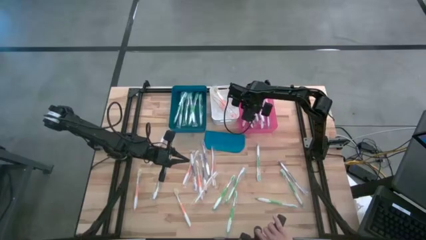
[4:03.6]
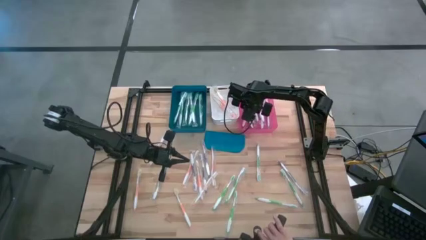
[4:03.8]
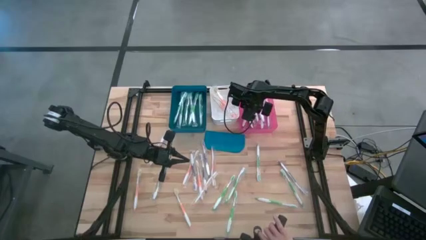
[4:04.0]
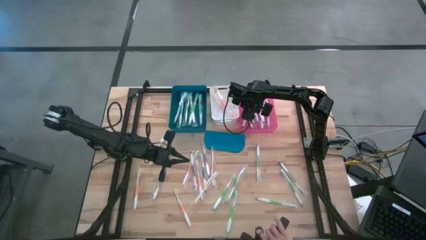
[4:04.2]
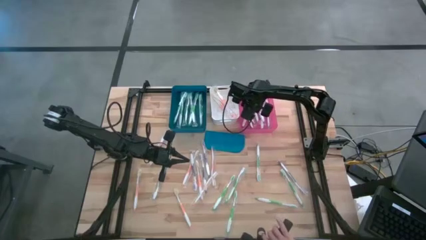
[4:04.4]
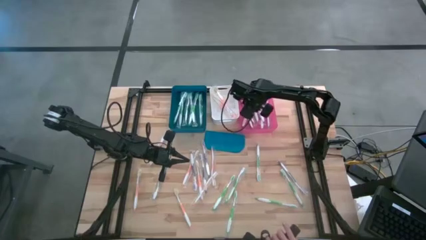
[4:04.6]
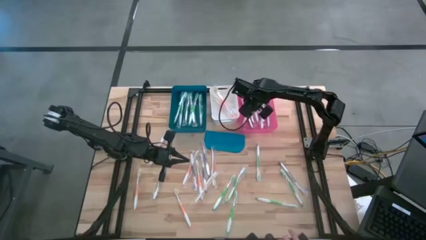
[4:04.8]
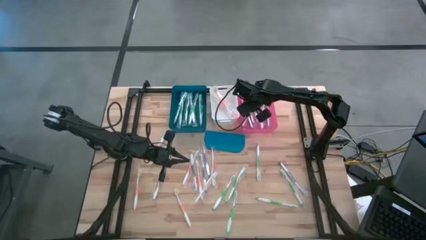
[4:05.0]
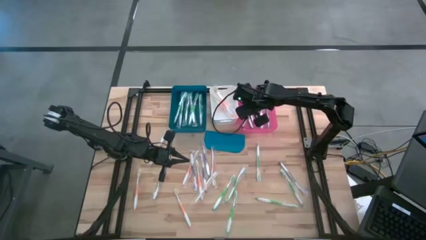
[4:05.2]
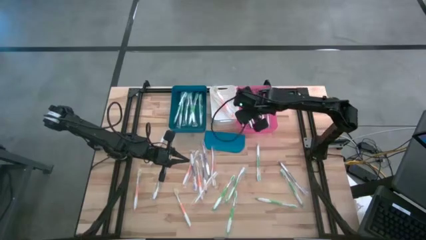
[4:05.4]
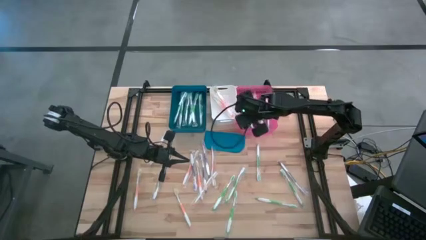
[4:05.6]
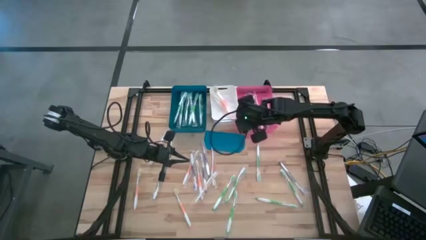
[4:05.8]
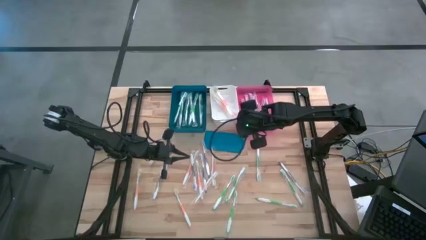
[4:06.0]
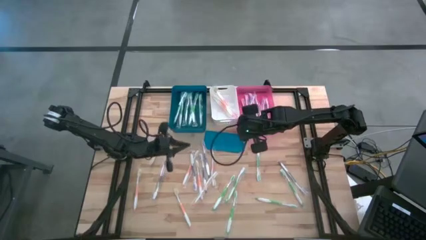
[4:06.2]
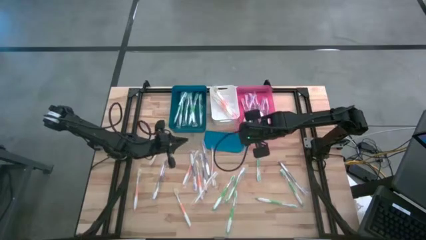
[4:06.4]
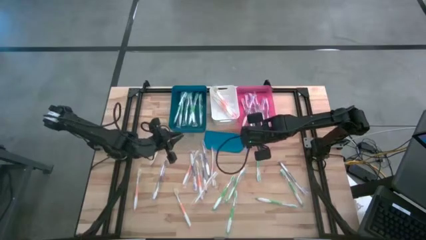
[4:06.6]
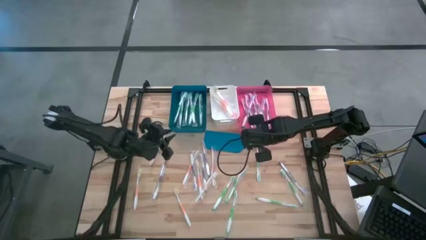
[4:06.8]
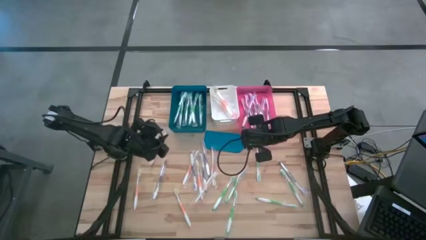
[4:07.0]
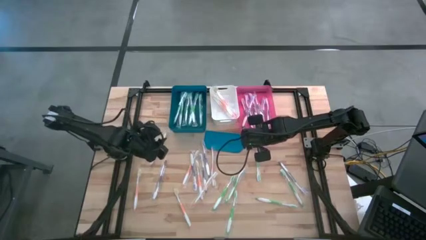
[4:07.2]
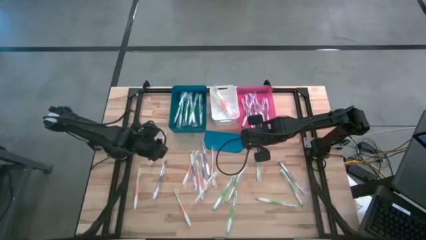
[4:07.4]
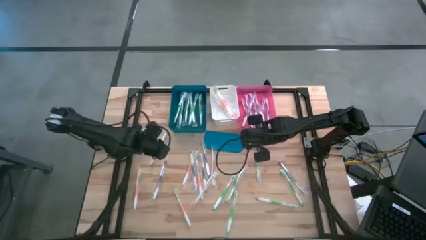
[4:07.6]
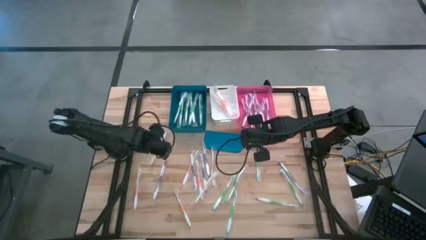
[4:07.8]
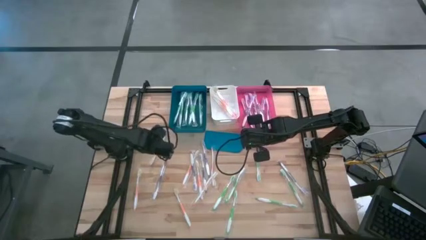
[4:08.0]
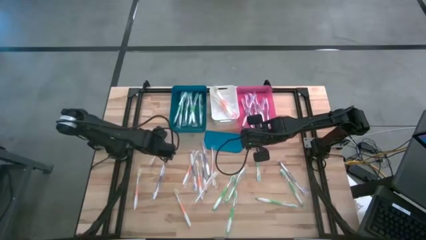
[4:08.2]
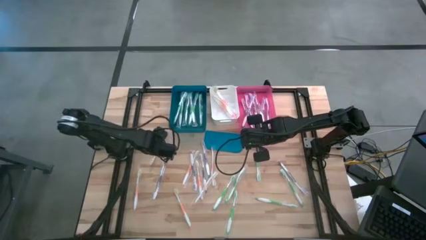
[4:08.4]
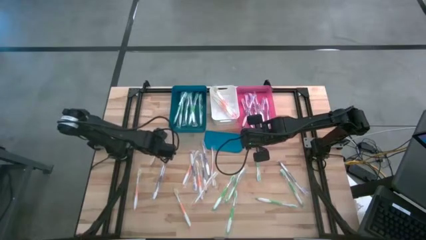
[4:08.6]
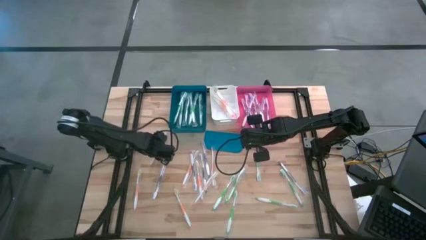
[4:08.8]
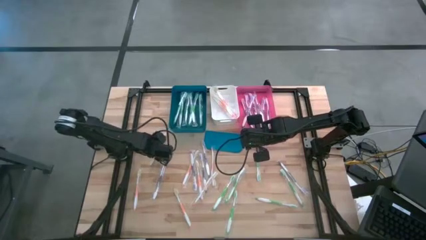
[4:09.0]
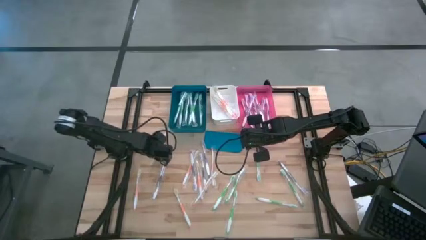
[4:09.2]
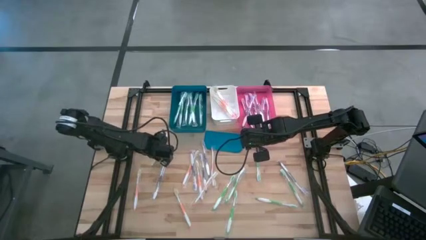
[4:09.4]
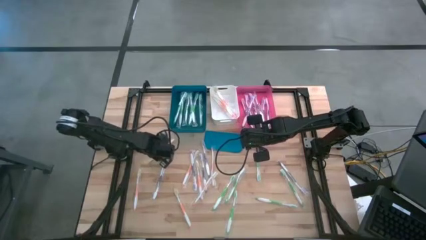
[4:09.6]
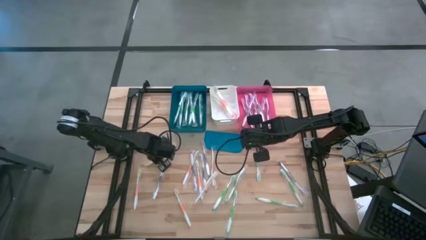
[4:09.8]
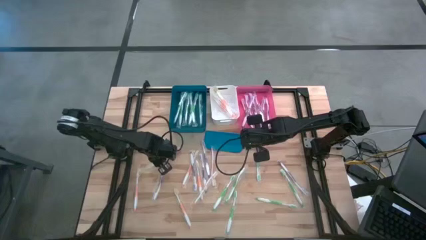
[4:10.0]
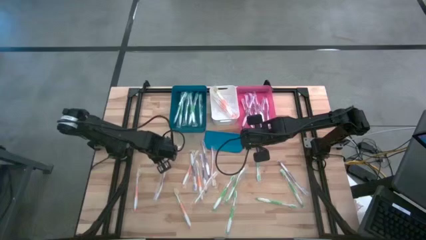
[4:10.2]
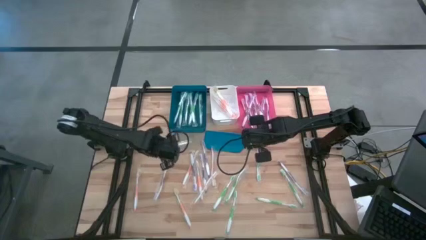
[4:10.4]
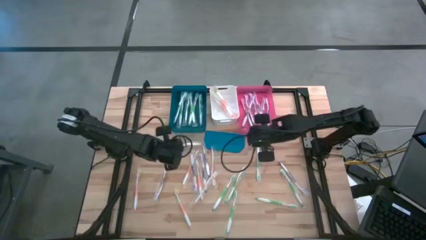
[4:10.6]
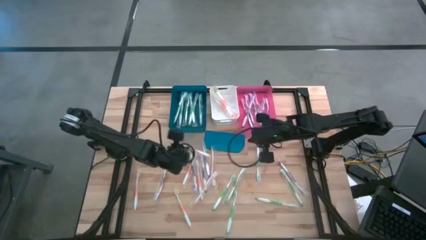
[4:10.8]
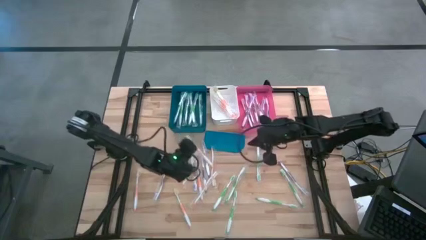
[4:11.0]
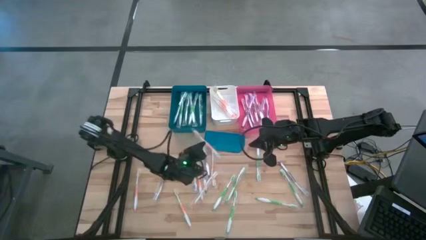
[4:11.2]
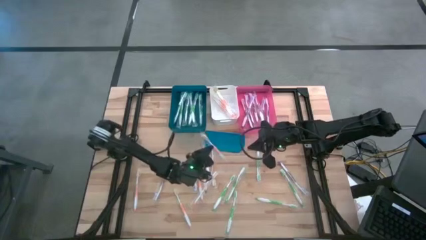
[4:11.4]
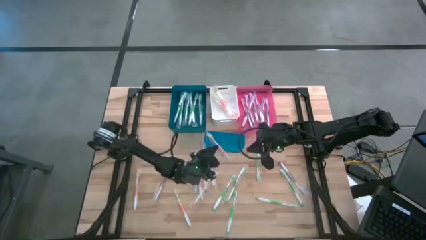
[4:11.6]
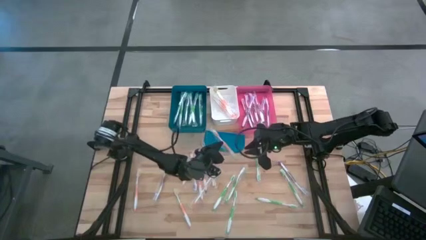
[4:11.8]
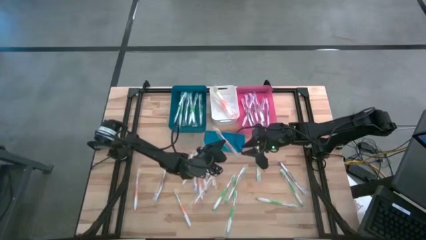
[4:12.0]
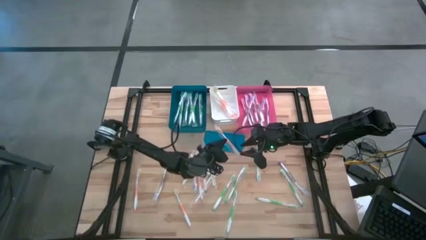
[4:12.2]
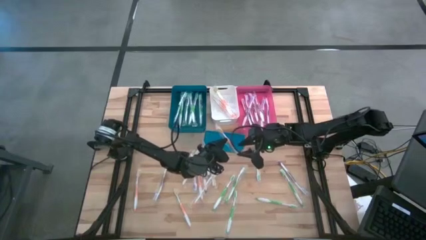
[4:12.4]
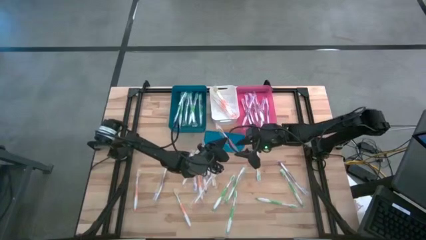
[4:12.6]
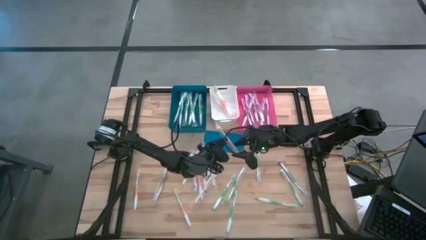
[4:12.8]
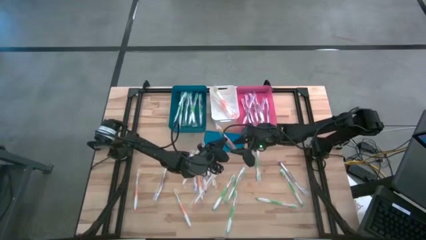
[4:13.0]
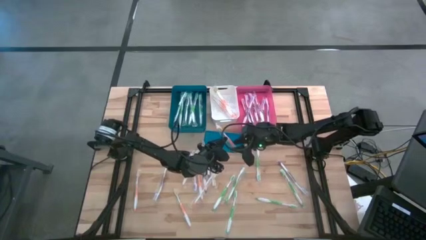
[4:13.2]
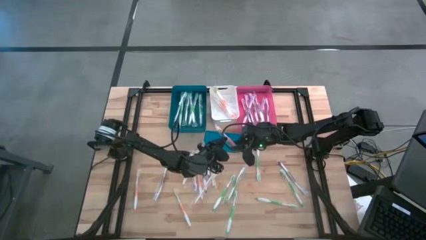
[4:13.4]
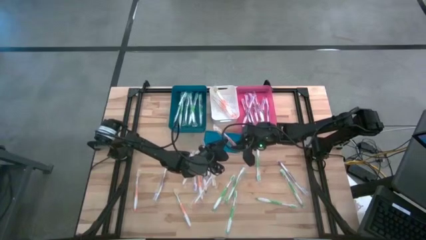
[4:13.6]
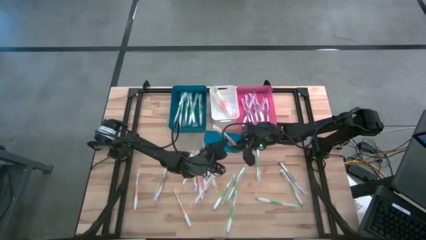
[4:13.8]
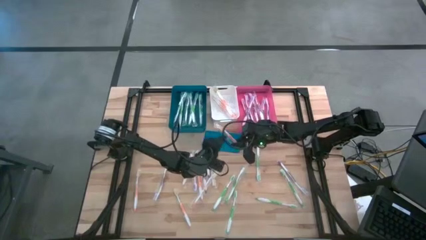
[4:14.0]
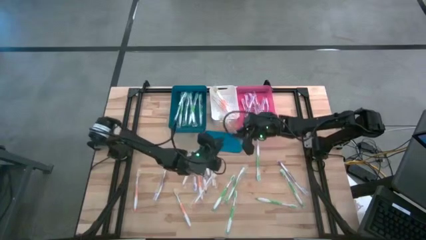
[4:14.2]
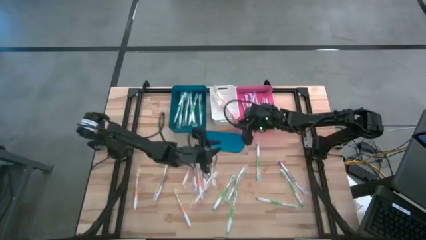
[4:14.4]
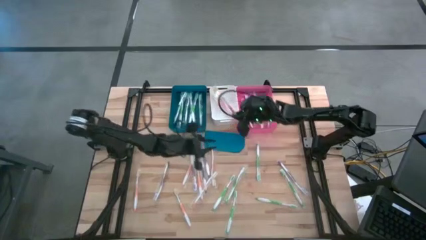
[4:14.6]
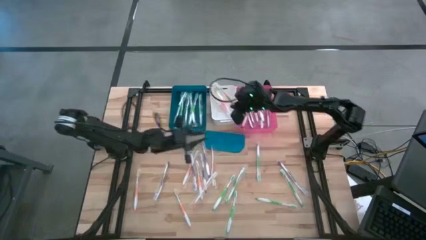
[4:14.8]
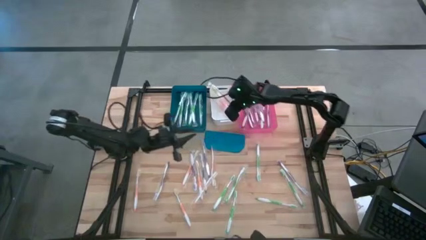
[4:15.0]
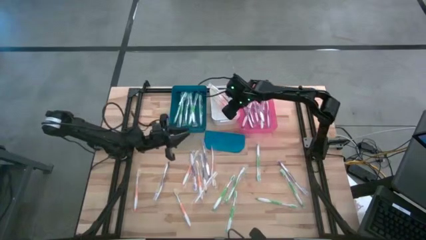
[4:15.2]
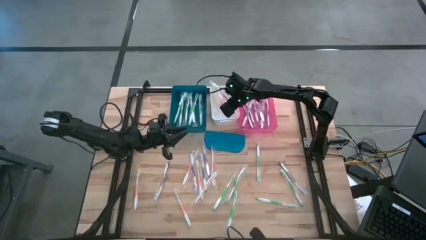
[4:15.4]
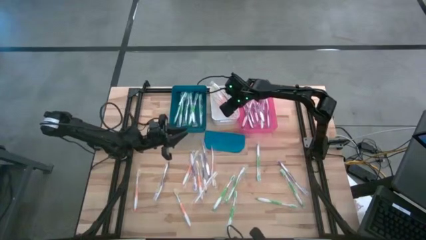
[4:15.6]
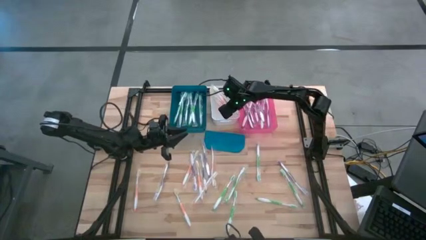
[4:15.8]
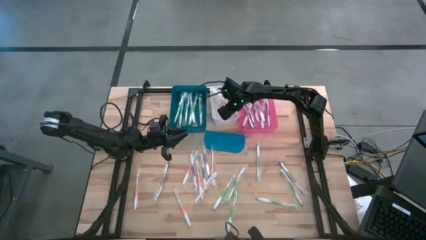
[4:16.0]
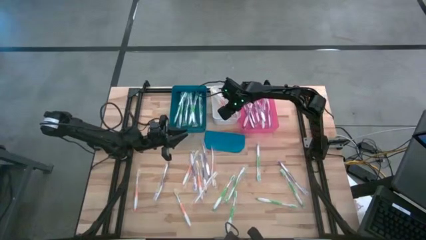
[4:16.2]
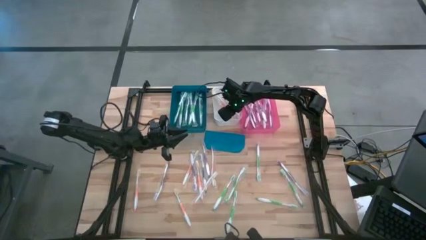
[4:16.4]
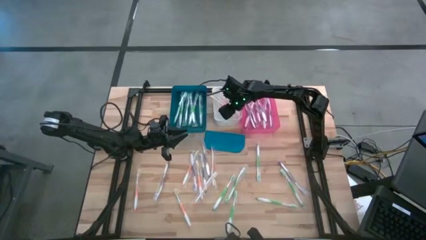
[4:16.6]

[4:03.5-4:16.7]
Task: Pick & Place Toothbrushes
Put the orange toothbrush into the white bin

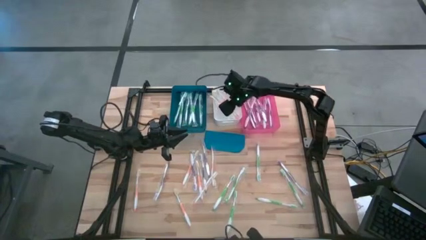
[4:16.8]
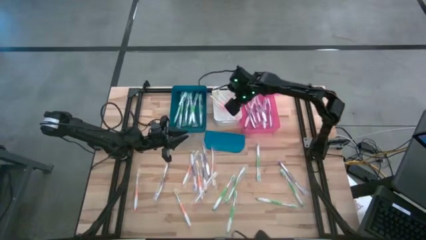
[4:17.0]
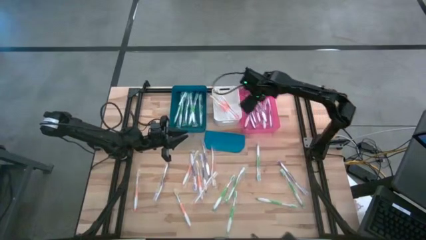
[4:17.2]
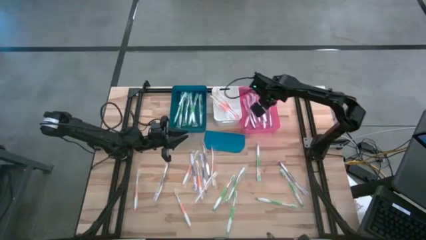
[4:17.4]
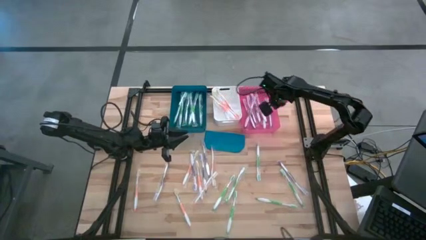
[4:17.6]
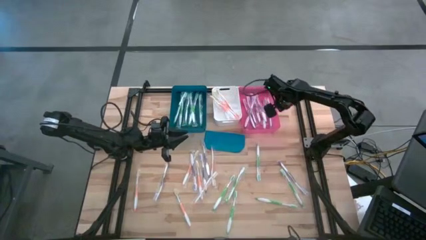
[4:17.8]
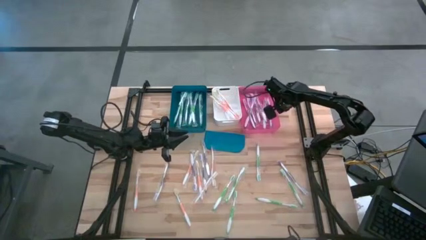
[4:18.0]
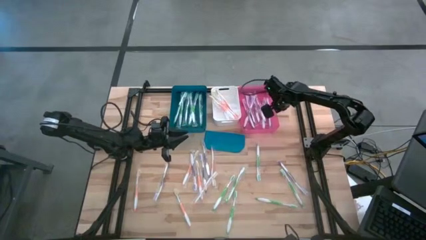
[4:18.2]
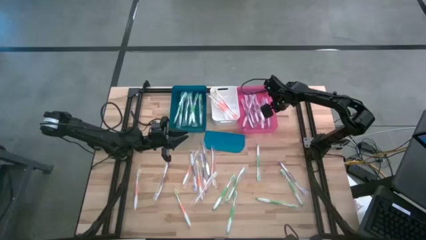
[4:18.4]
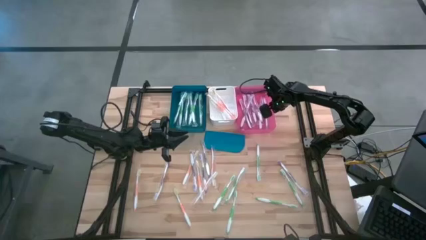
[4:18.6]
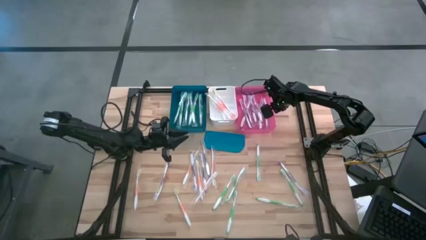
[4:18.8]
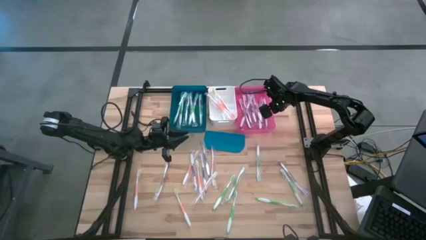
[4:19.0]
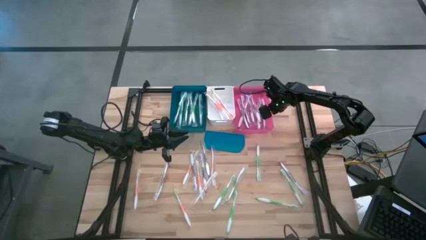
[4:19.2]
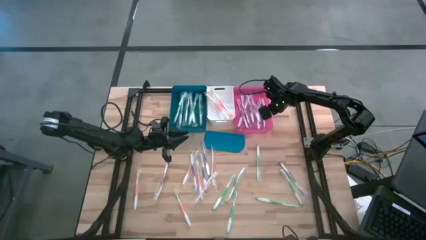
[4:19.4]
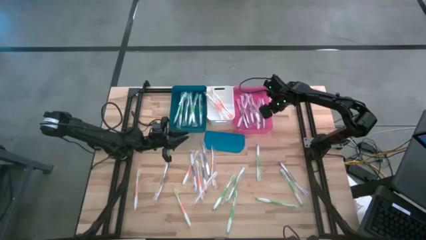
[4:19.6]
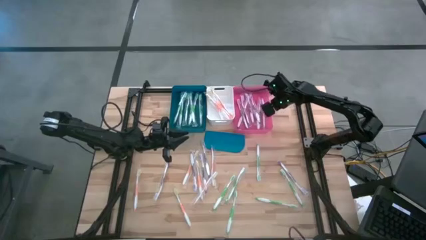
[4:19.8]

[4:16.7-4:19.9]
Adjust the pink bin on the table
